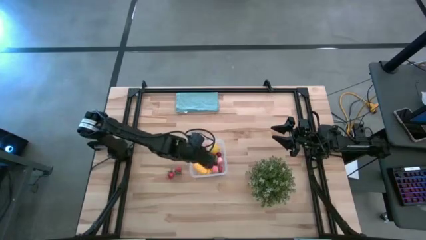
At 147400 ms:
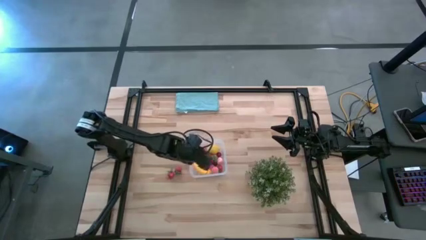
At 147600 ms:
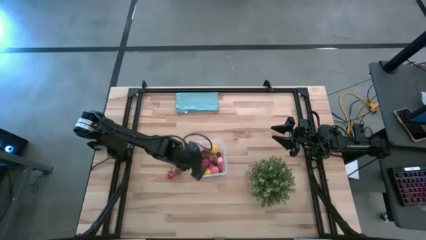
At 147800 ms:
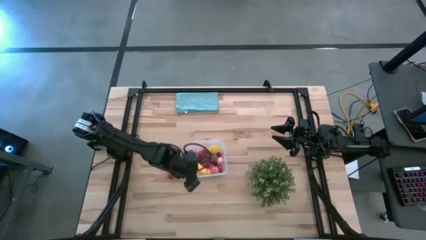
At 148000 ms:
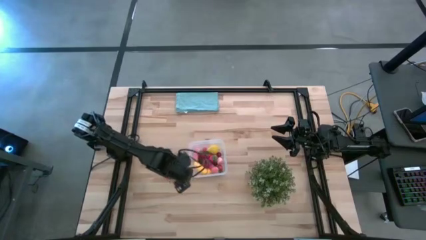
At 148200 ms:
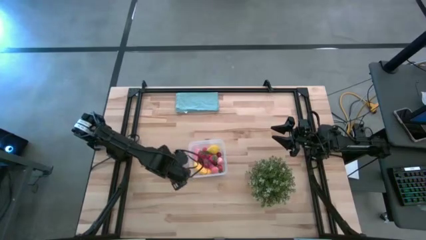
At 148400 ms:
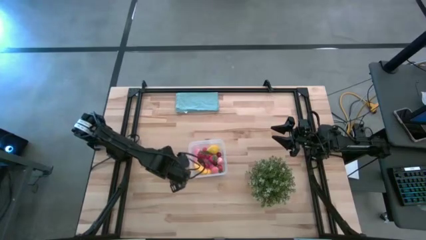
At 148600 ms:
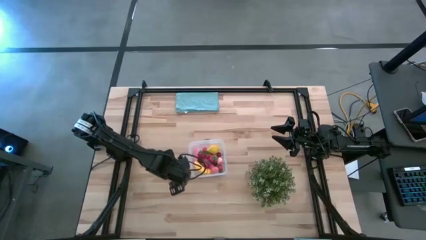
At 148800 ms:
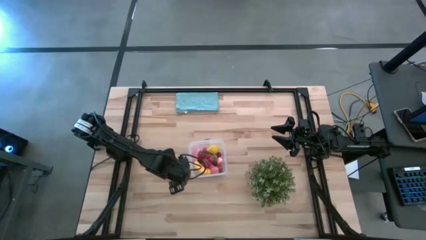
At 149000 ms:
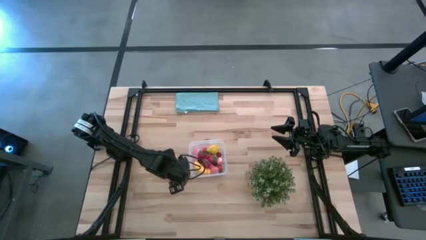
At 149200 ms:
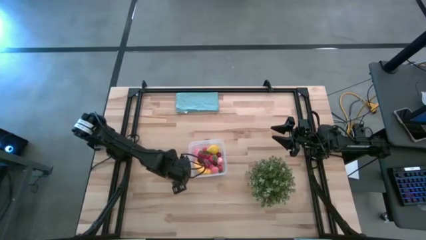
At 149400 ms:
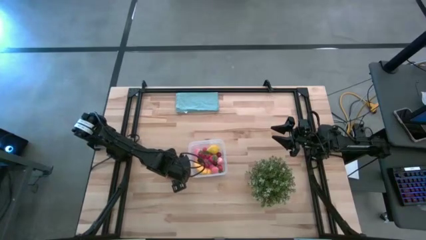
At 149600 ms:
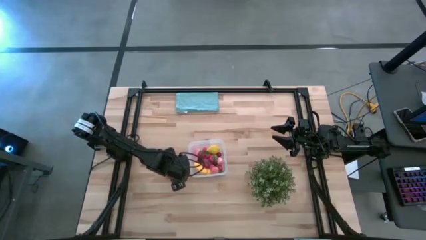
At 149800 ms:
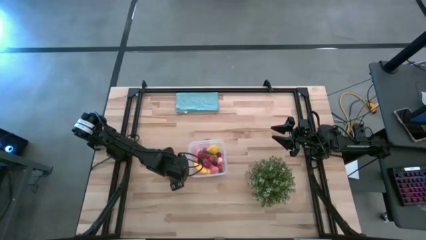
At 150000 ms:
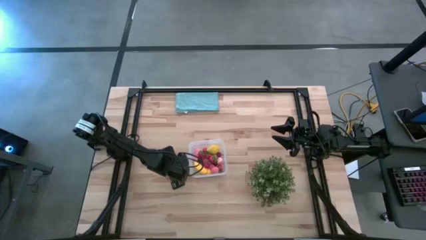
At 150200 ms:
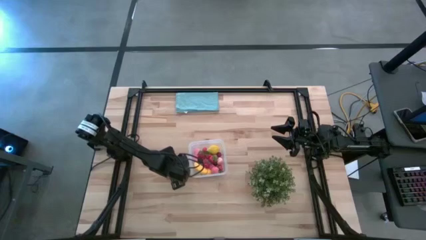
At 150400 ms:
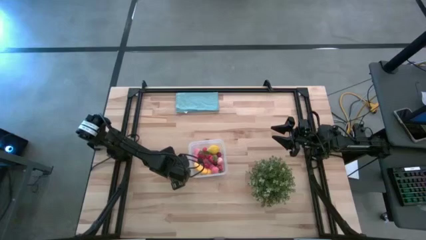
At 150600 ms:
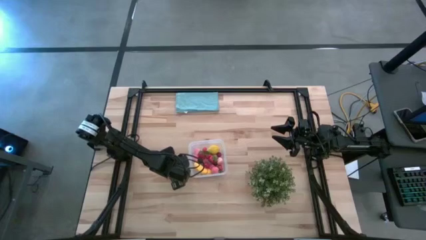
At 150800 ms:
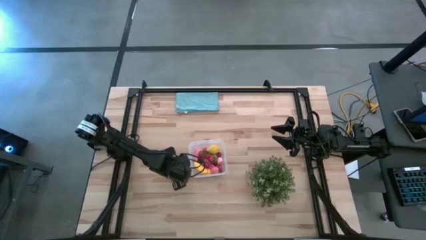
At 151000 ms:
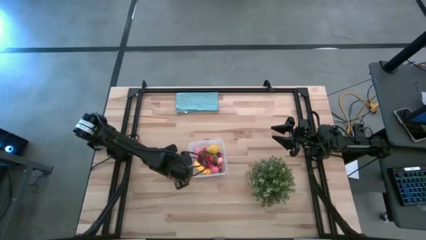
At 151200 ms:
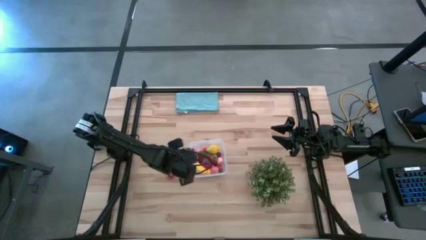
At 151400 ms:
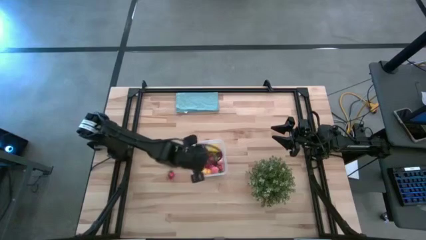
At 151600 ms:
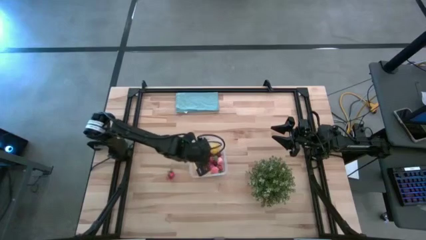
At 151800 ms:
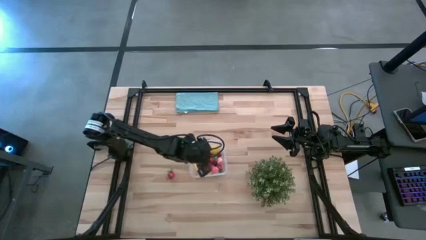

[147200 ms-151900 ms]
Task: Pick and placing Produce into tupperware
Put the red strawberry into the transparent bin

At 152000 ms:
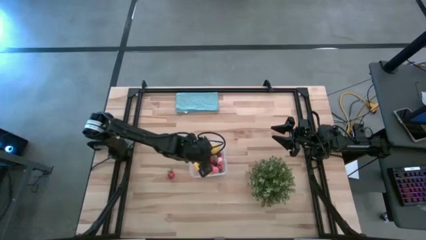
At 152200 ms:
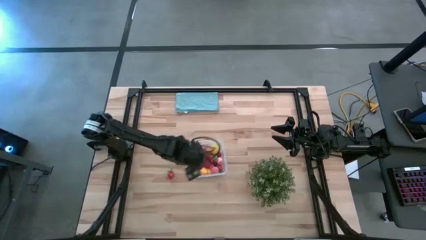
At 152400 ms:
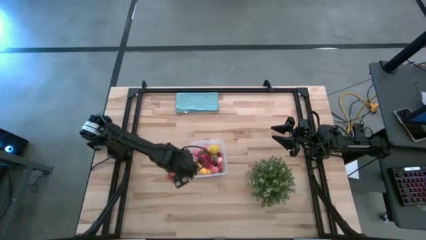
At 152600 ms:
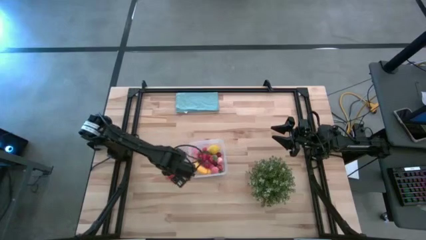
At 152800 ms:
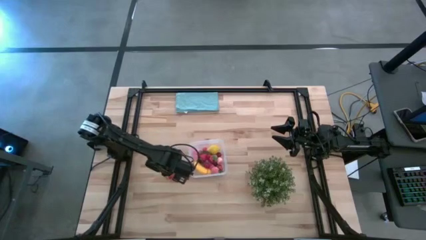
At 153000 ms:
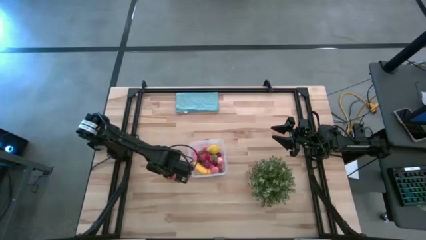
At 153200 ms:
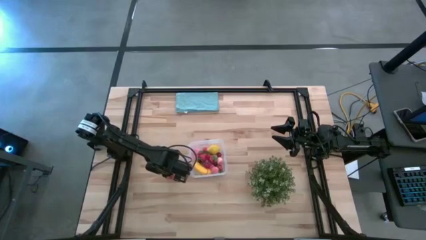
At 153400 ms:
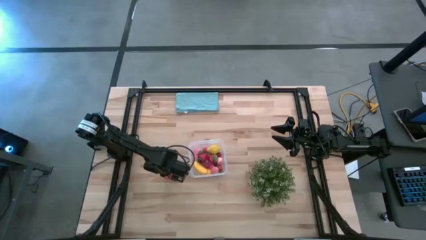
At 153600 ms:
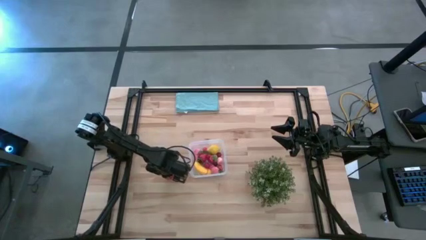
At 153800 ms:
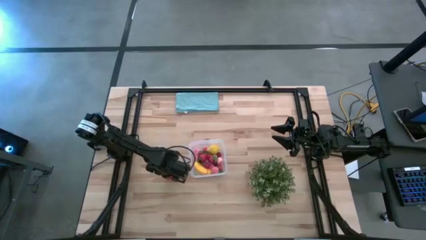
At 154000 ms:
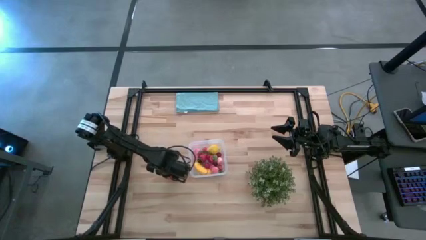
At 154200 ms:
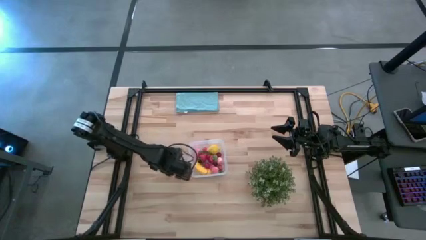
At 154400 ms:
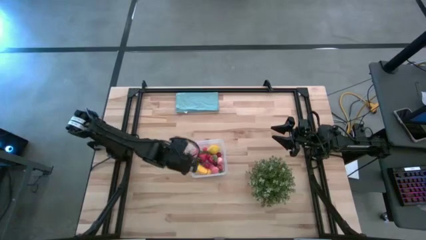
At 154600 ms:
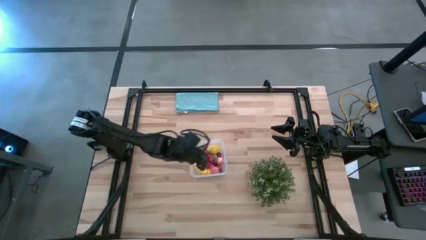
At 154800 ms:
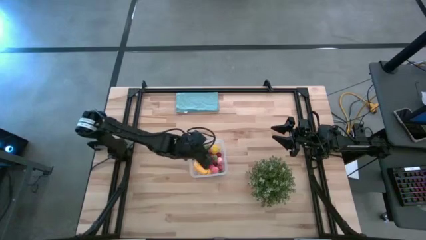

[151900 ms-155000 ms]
Put the red strawberry into the transparent bin

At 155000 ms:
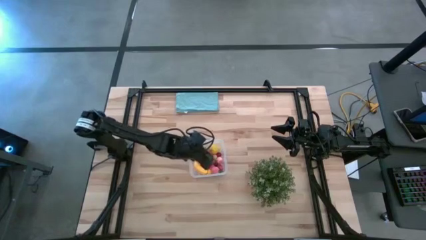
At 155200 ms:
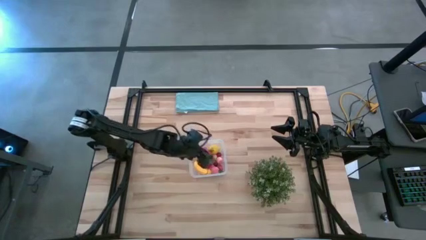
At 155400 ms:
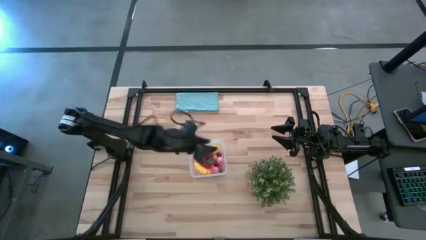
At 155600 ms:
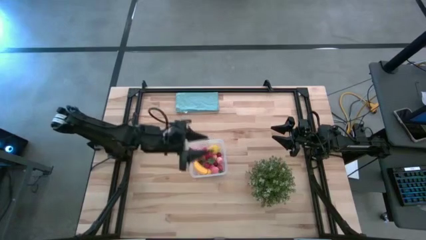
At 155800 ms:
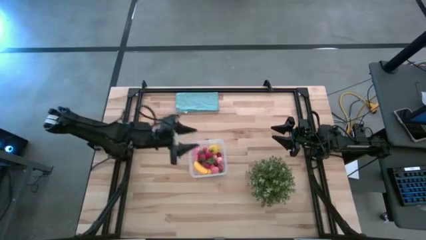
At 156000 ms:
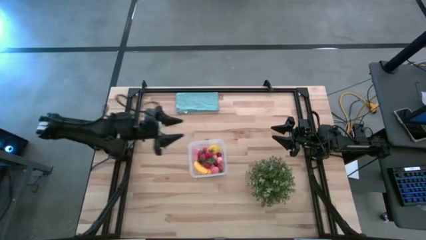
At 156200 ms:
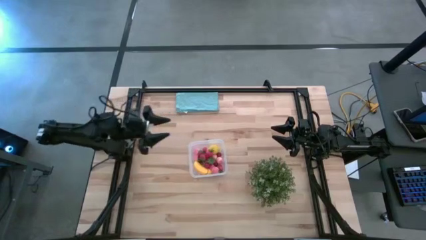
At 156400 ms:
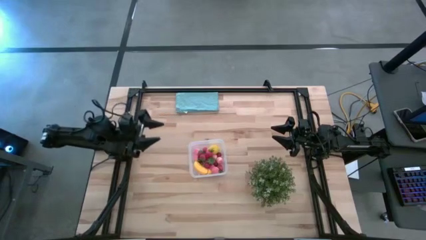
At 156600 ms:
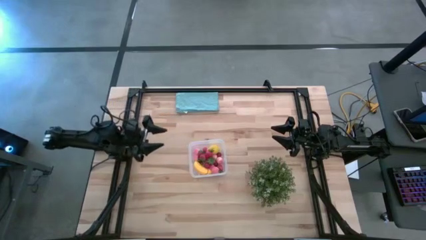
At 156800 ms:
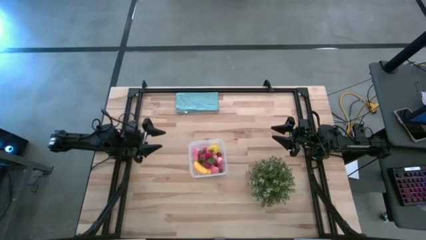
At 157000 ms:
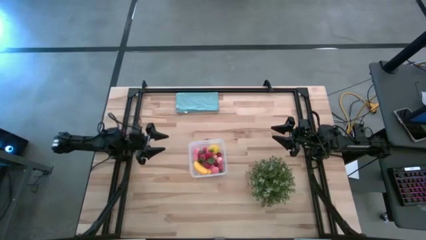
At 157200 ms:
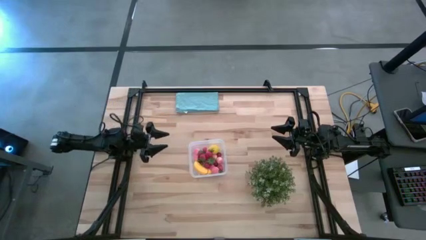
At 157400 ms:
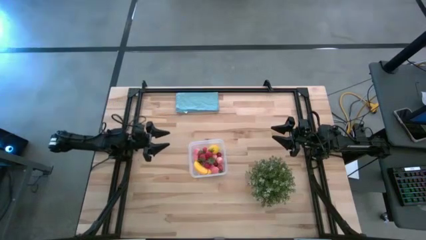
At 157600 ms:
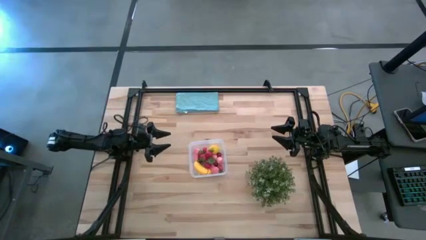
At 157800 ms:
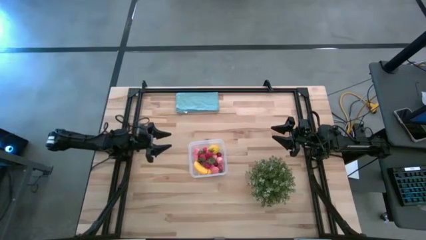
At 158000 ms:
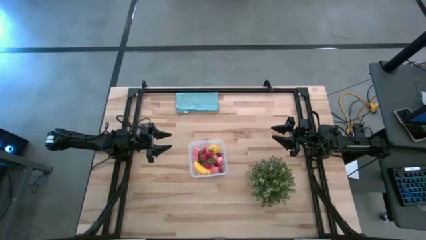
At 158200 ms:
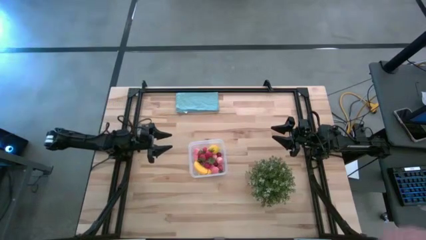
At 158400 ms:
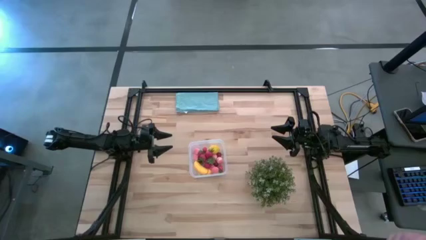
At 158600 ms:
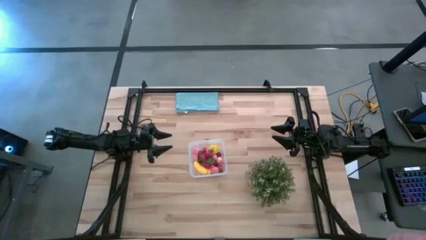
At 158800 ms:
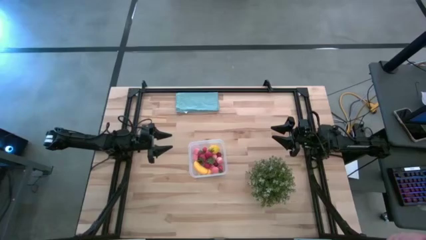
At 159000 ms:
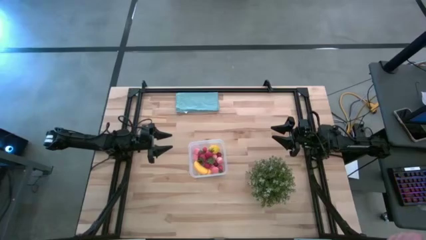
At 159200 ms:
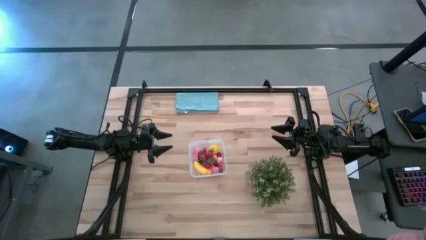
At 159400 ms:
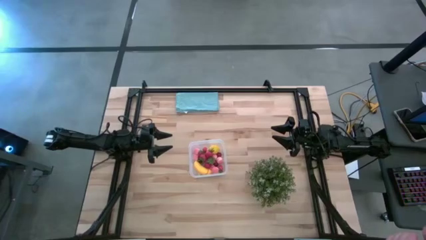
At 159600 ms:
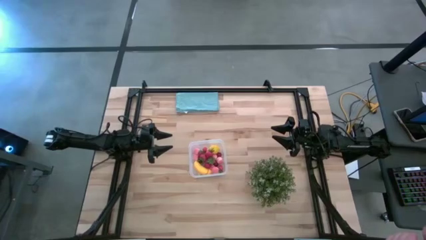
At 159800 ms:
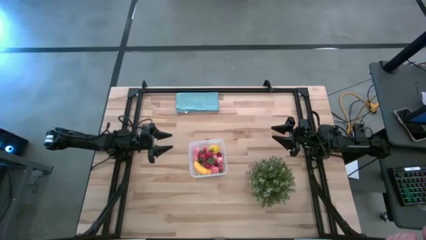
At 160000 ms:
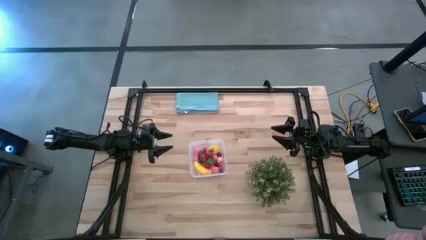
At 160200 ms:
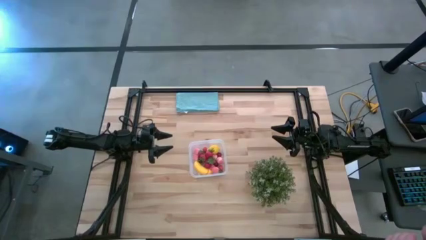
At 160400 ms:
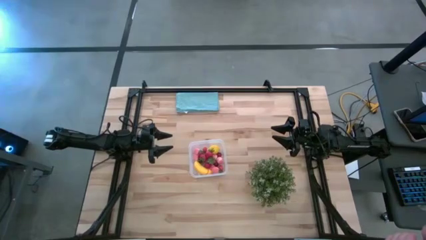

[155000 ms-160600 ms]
Return to Home Position

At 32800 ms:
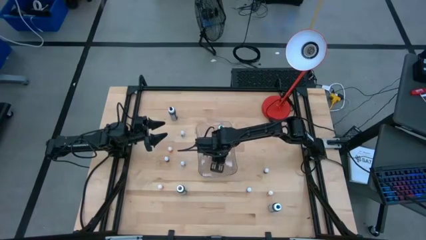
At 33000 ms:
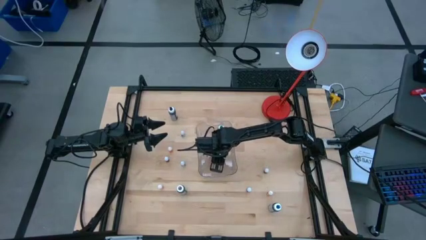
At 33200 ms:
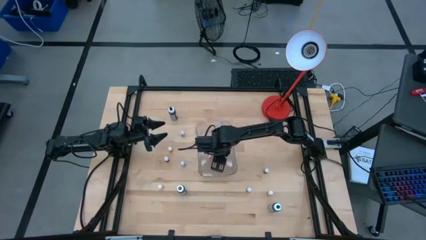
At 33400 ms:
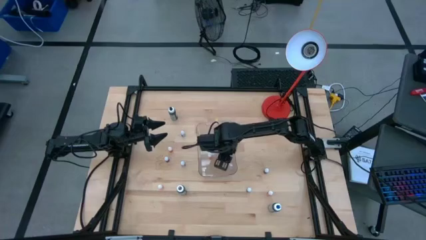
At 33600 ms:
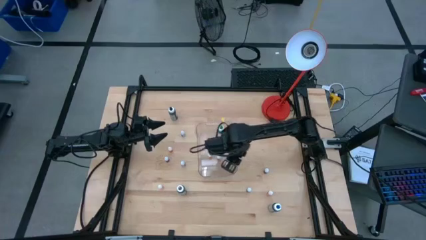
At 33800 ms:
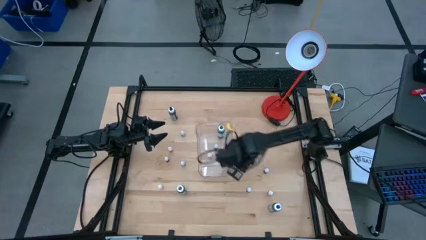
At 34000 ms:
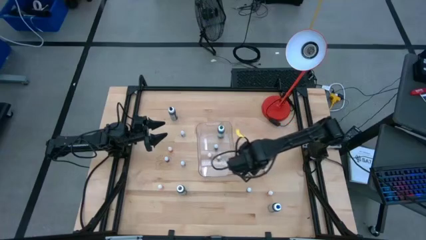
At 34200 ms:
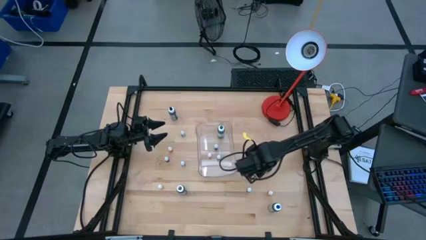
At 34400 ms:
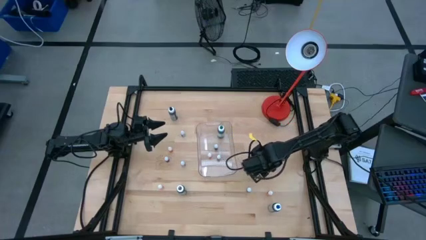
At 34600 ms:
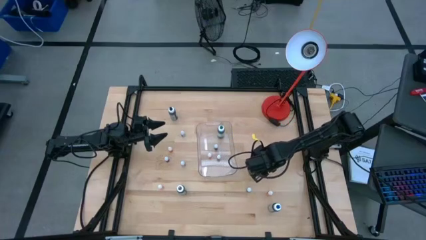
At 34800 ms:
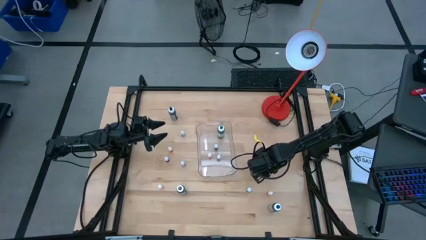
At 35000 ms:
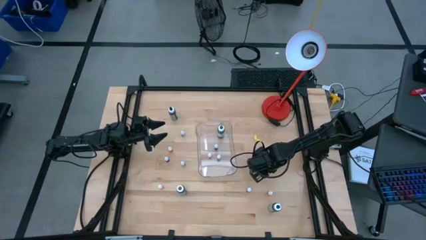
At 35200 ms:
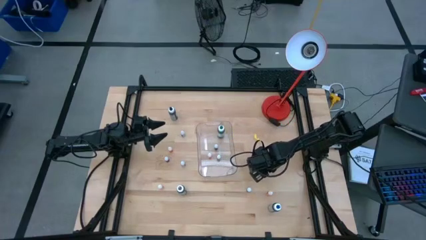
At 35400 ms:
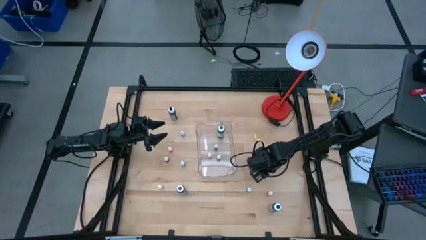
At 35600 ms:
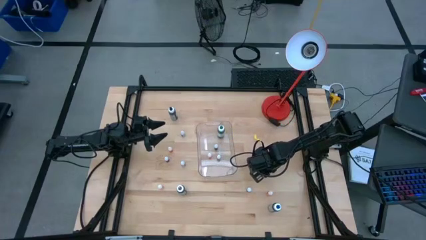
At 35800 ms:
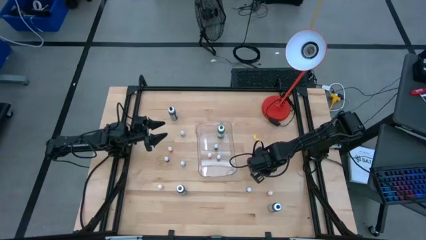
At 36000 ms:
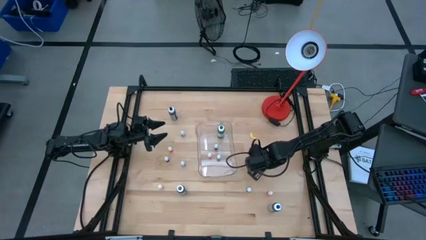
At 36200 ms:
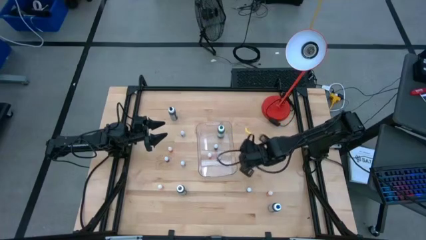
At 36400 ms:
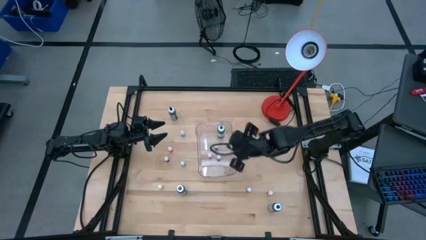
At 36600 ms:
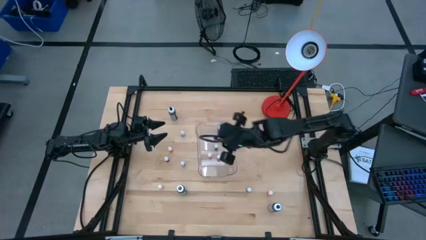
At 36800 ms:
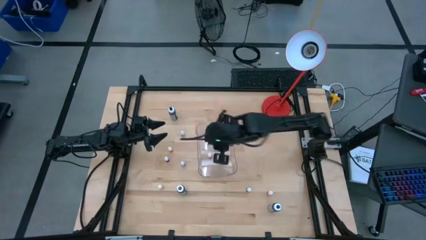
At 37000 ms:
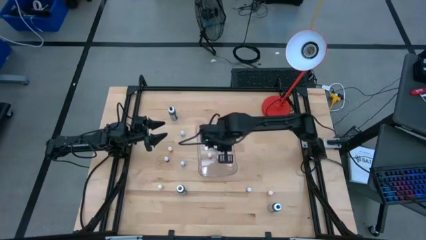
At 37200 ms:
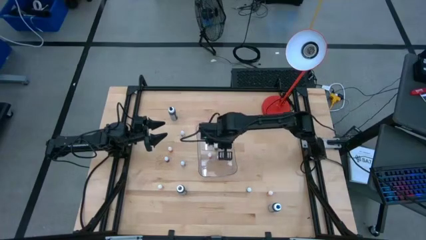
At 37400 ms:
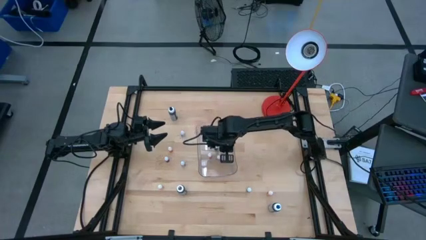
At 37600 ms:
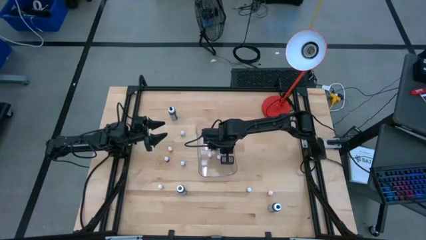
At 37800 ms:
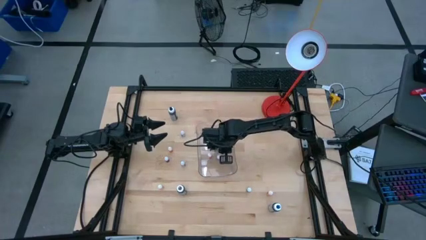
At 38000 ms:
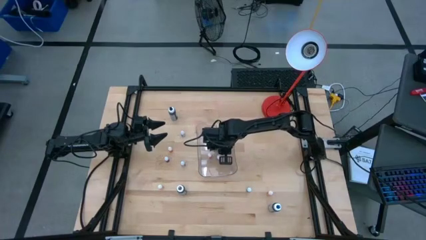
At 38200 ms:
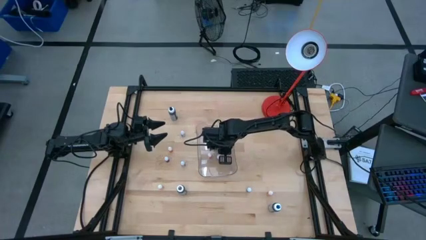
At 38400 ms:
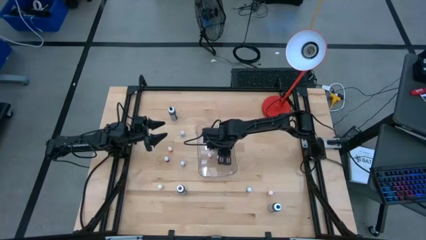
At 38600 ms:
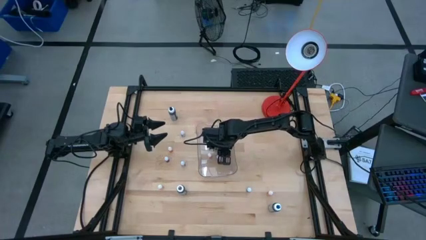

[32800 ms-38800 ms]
Task: Pick & Place food coloring
Put the small black food coloring bottle into the transparent bin
